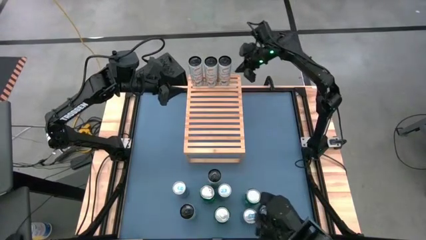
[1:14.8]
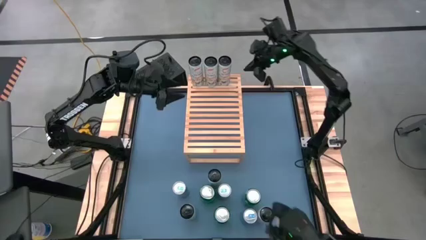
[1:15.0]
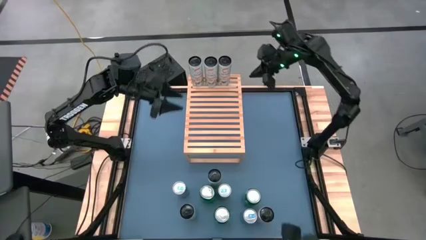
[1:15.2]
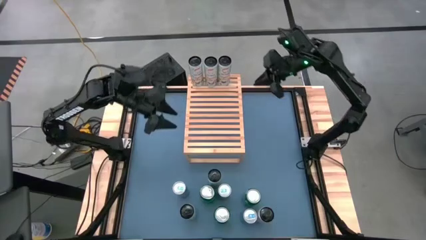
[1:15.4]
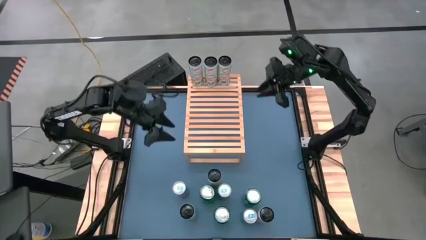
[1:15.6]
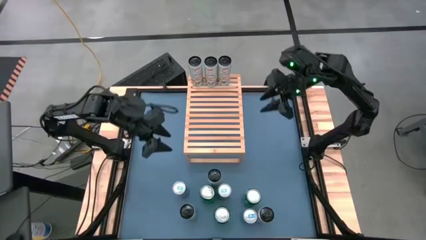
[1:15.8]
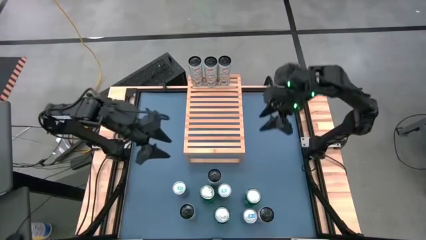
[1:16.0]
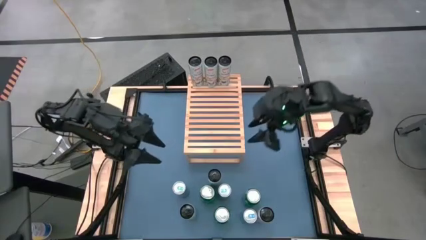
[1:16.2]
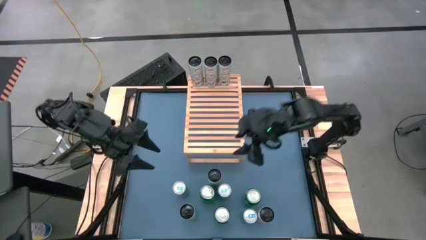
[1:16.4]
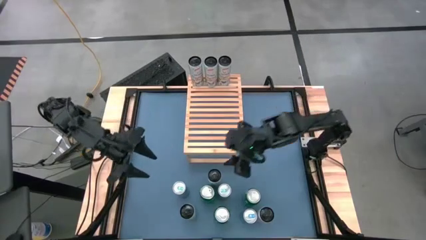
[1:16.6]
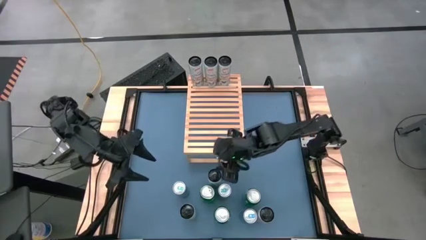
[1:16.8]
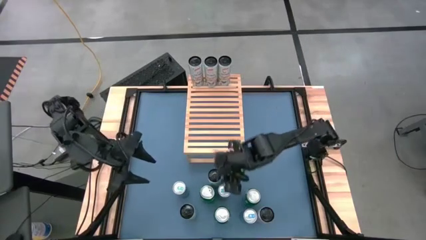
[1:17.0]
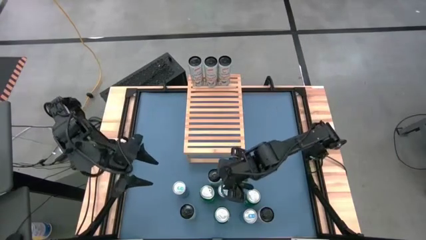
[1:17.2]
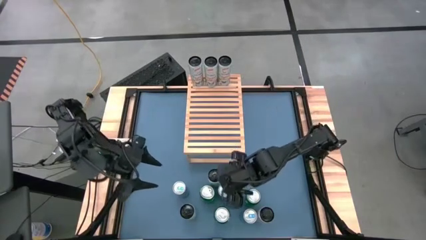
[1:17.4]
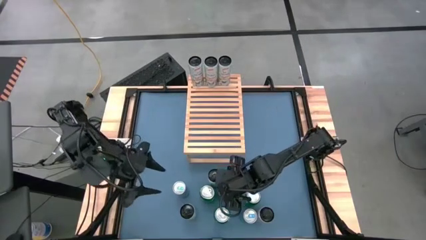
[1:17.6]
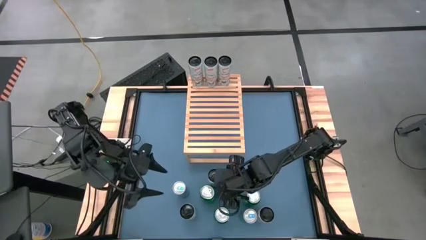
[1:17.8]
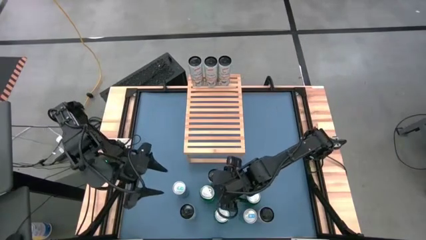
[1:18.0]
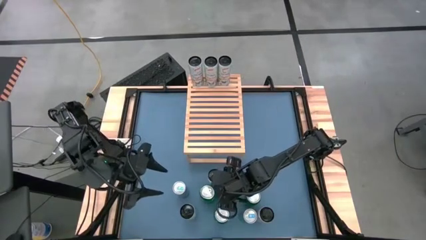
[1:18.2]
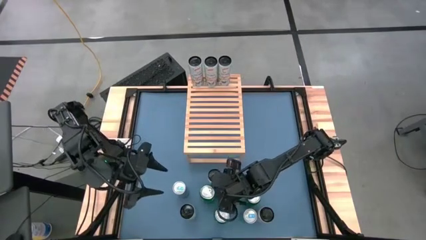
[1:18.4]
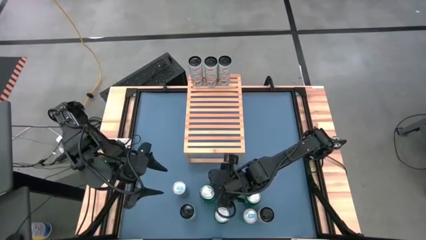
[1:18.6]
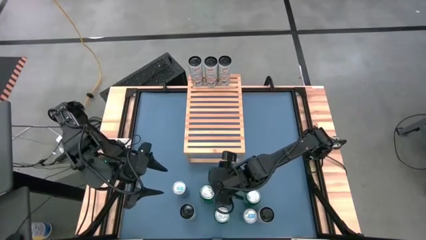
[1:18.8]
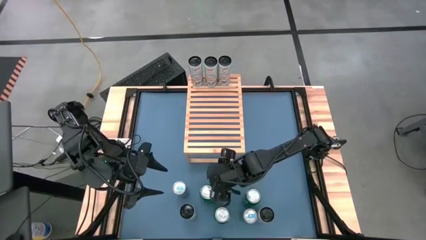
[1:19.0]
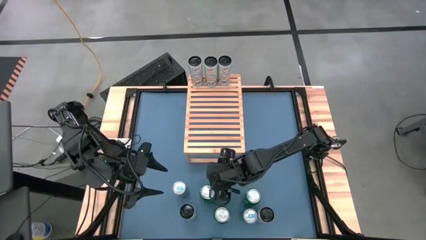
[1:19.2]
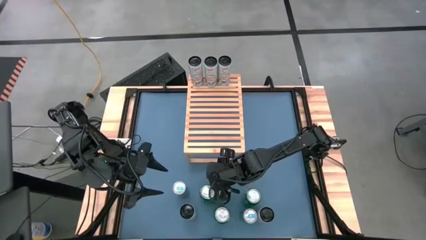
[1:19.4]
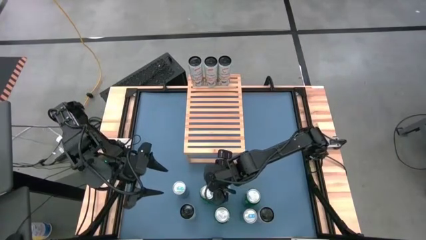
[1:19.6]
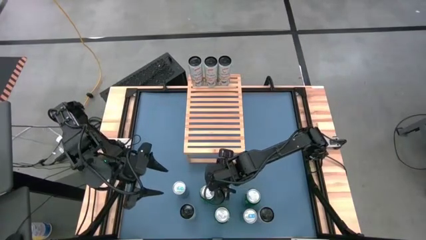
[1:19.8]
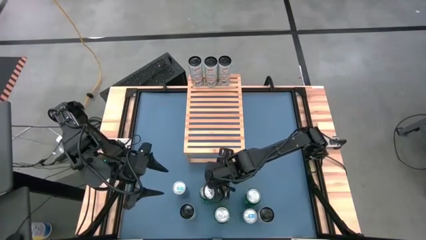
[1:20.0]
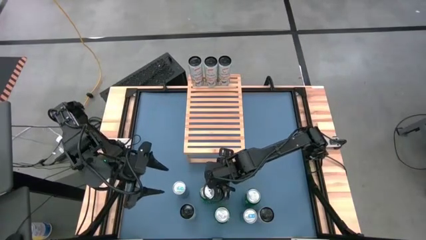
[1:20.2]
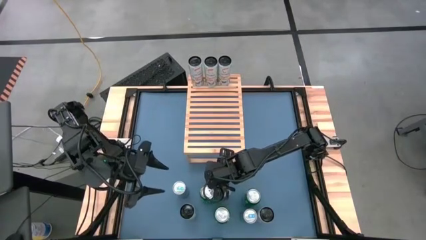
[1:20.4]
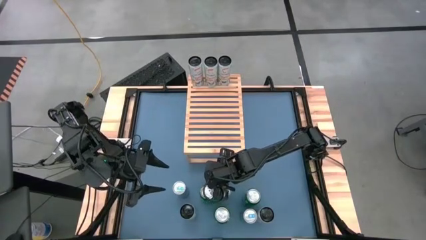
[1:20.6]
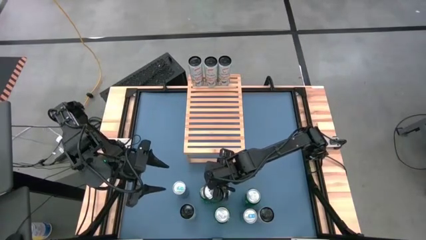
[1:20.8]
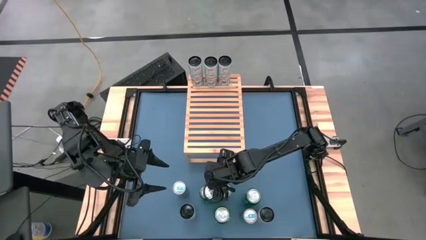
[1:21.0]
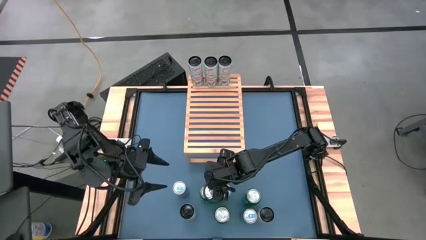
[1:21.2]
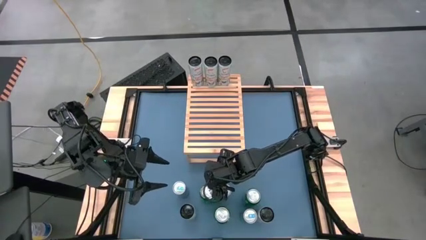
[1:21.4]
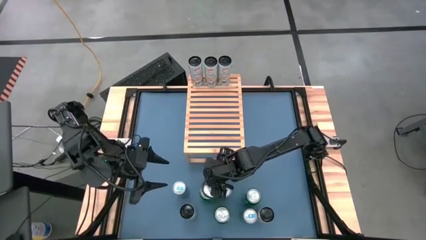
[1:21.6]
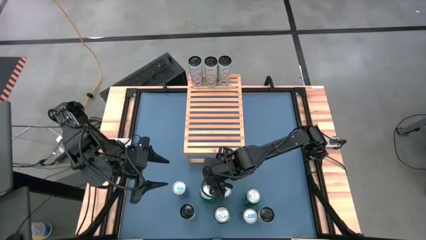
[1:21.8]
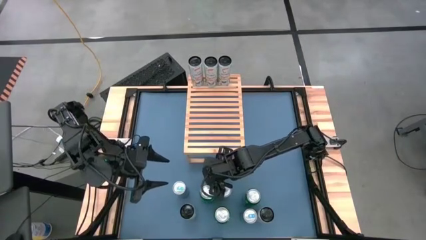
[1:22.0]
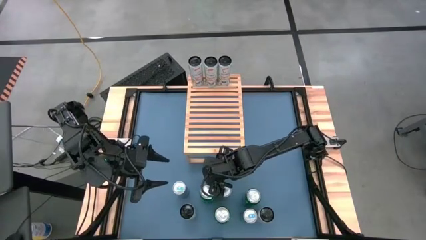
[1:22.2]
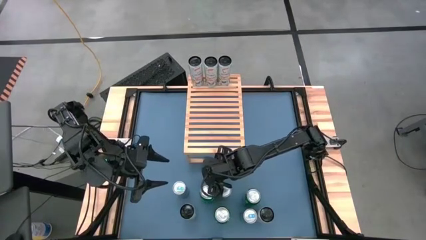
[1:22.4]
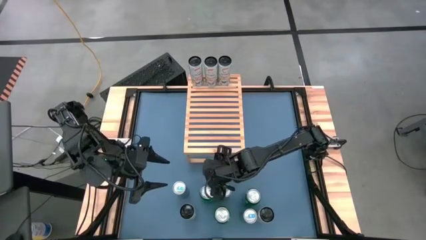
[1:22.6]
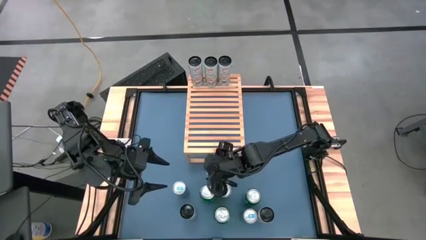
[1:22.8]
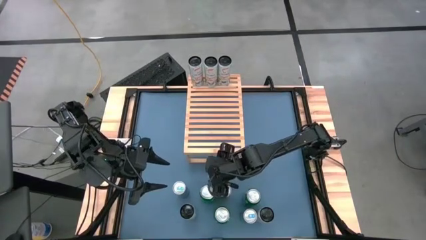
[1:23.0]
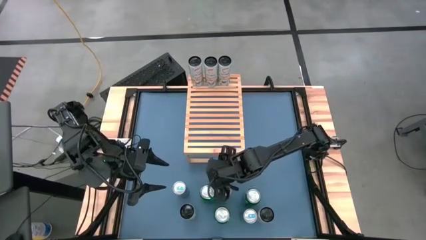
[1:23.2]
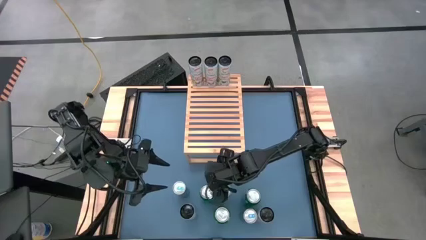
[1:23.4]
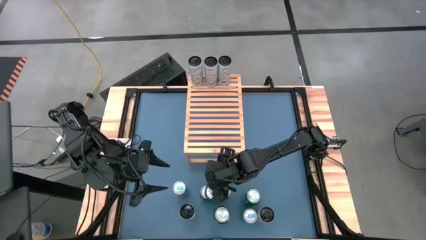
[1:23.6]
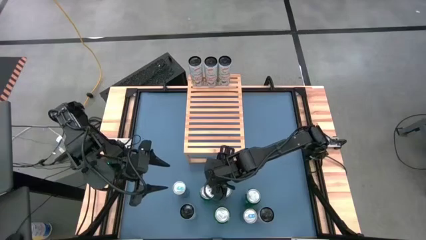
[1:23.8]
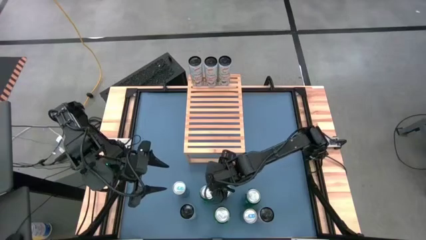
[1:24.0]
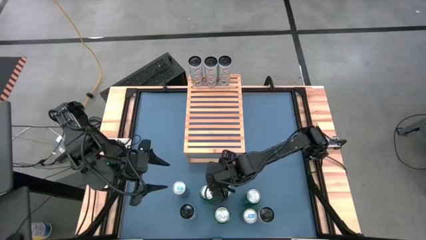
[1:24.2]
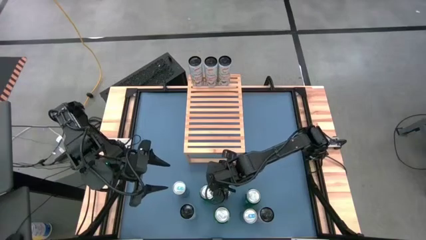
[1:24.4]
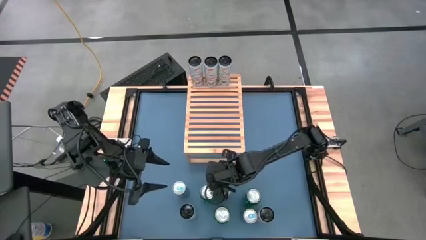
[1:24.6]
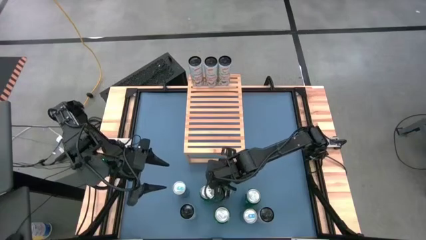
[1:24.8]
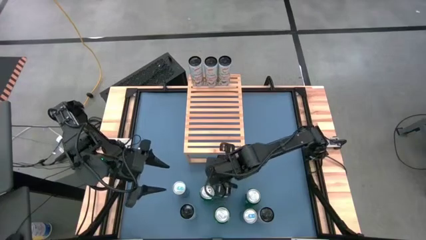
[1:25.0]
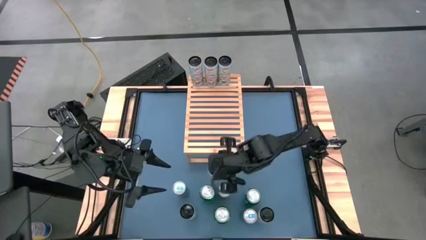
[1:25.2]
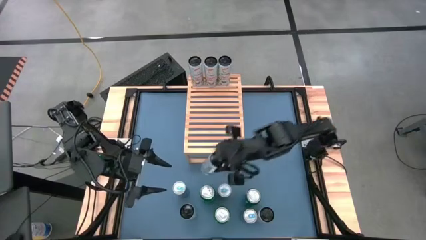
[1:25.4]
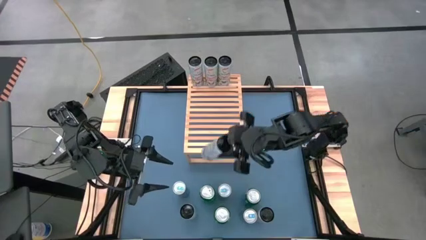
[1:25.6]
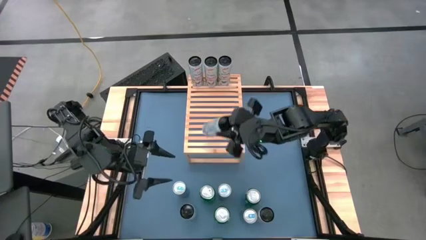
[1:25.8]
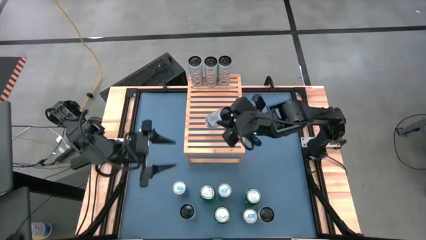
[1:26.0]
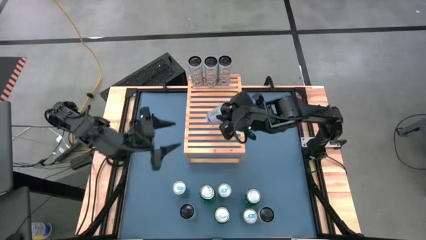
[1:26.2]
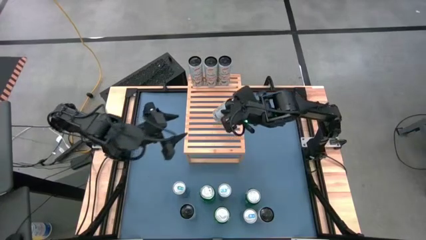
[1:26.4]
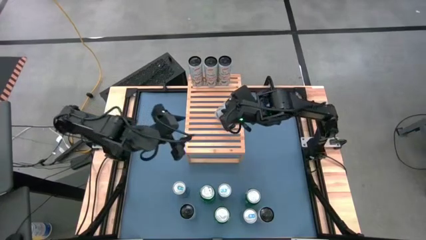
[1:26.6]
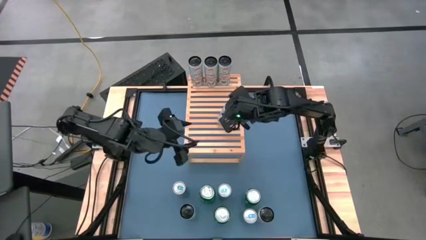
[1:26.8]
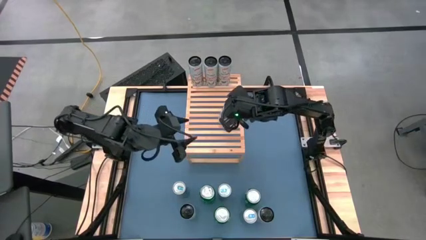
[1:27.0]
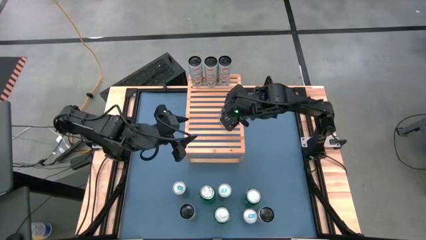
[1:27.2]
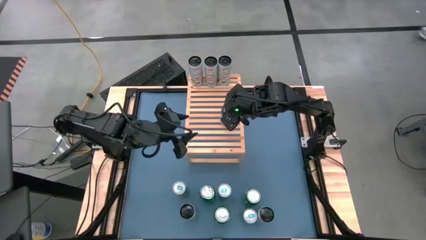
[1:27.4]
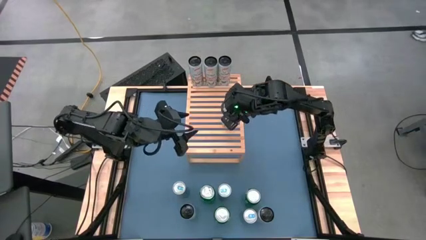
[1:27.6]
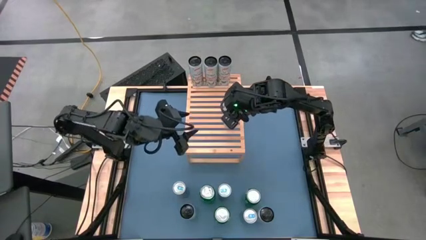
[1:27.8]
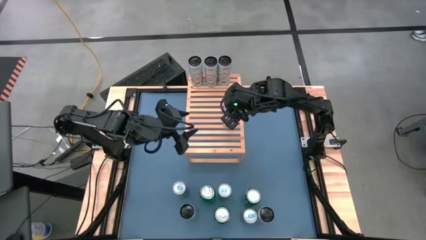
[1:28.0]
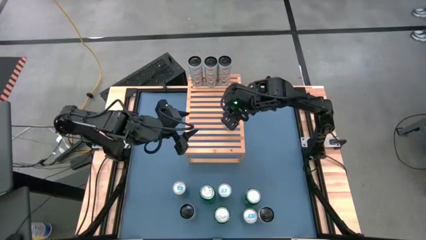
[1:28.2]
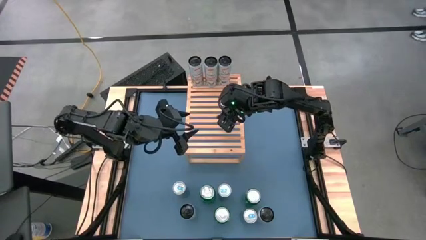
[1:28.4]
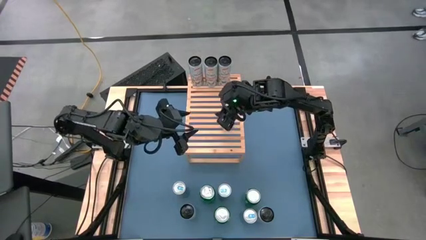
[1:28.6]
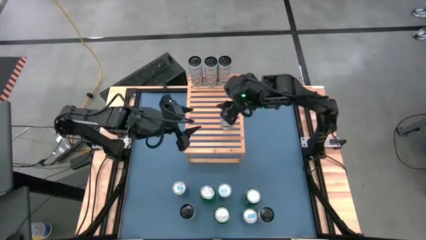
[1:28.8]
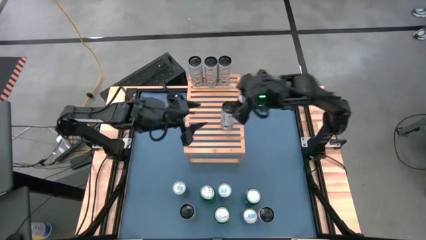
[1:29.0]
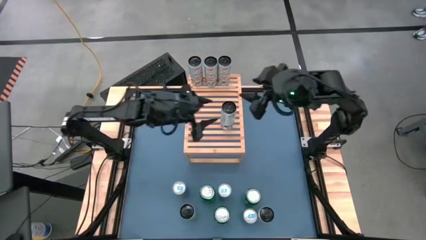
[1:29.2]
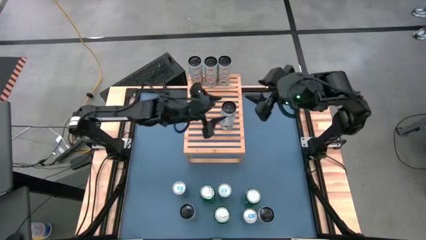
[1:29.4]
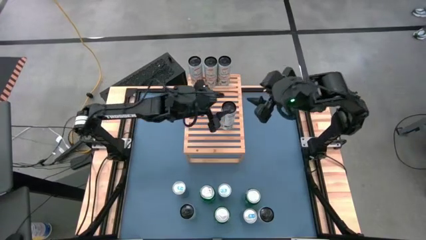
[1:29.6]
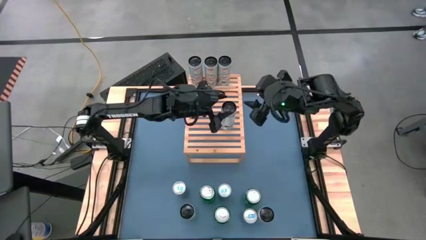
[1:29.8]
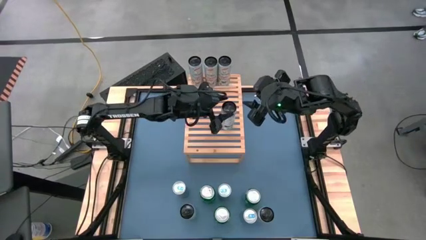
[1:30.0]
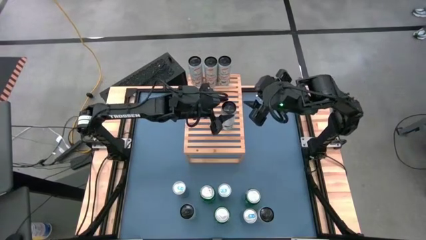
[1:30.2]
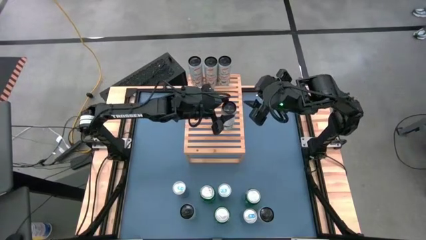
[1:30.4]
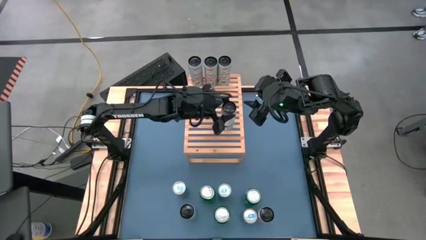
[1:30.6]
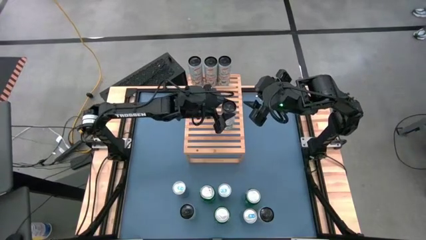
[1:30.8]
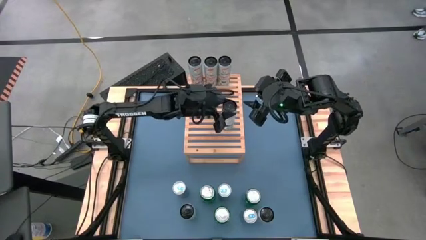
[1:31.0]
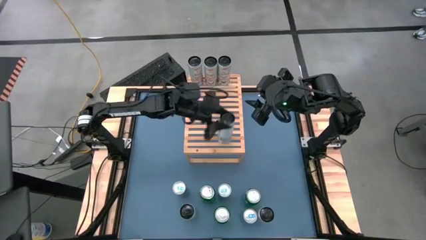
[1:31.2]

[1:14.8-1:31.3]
Task: Place canned beverage on shelf
Put the white blue soda can on the shelf
